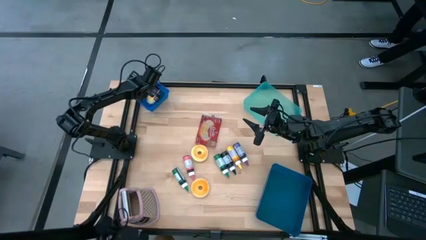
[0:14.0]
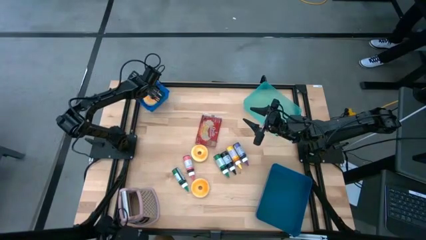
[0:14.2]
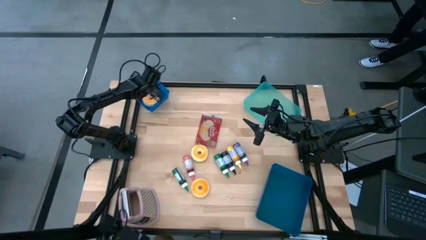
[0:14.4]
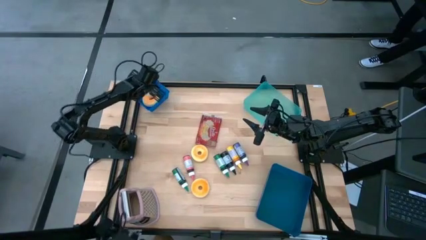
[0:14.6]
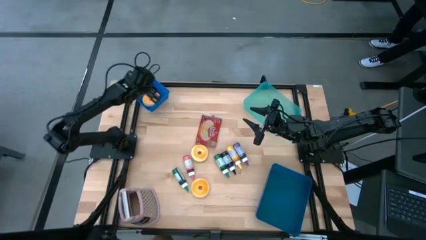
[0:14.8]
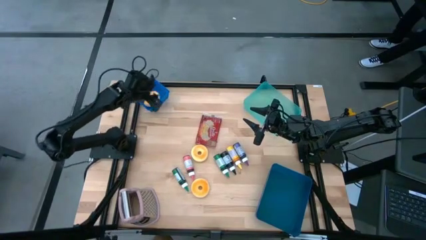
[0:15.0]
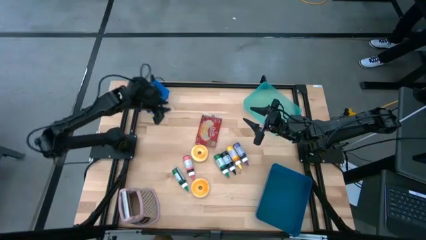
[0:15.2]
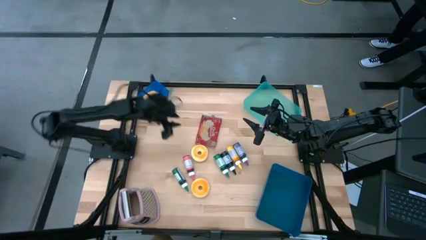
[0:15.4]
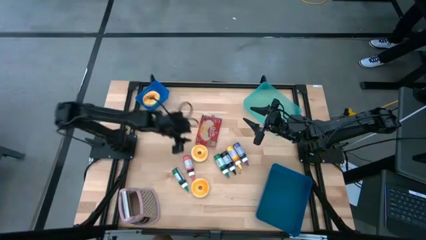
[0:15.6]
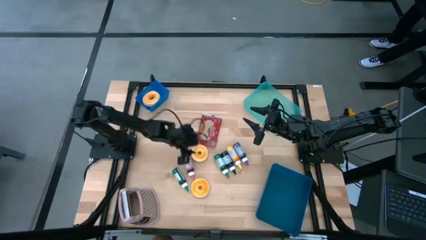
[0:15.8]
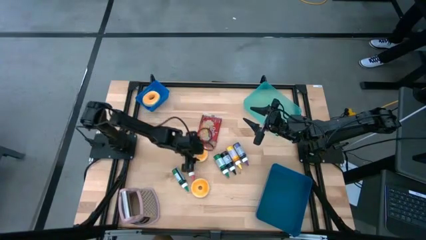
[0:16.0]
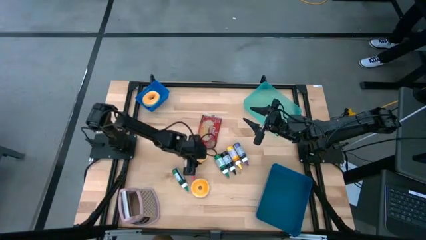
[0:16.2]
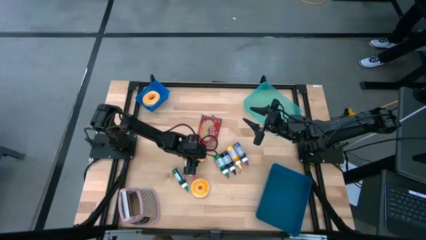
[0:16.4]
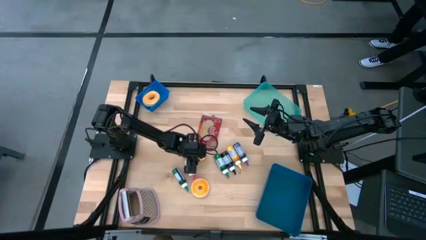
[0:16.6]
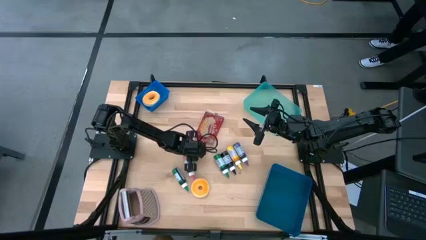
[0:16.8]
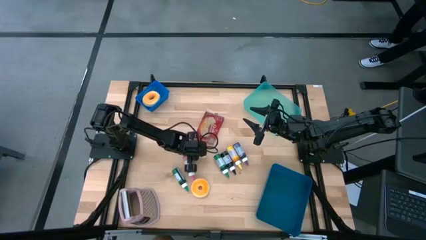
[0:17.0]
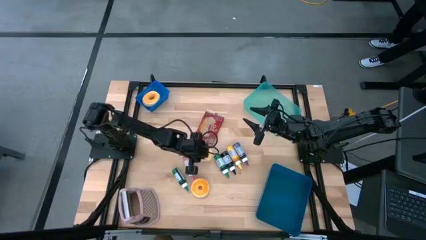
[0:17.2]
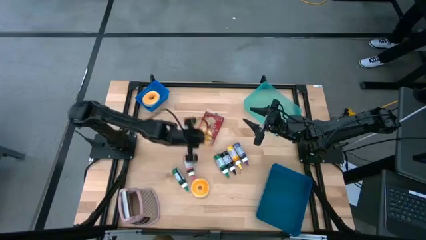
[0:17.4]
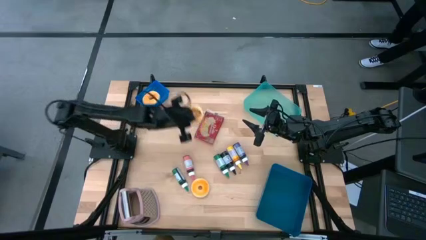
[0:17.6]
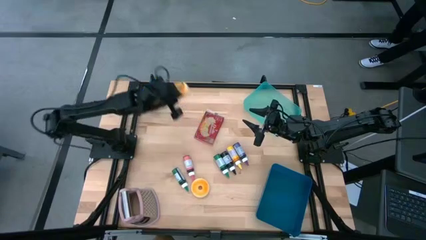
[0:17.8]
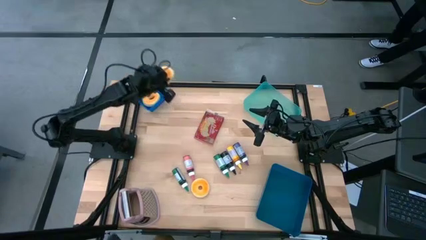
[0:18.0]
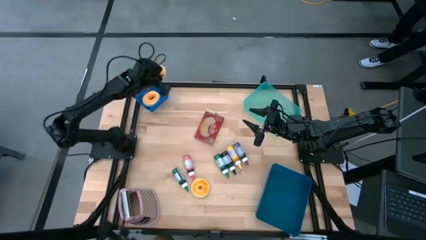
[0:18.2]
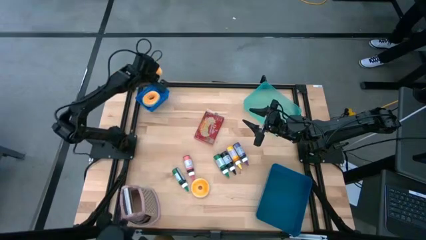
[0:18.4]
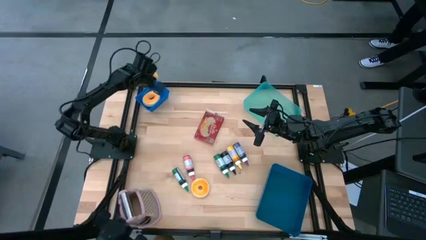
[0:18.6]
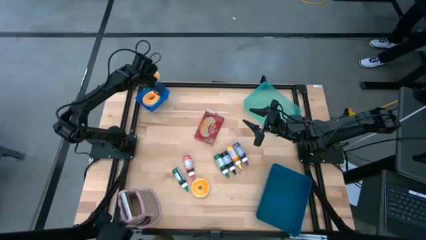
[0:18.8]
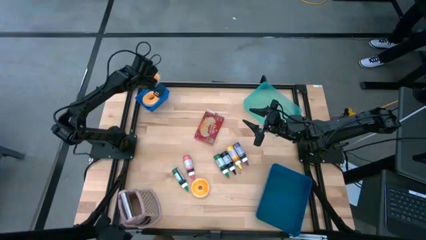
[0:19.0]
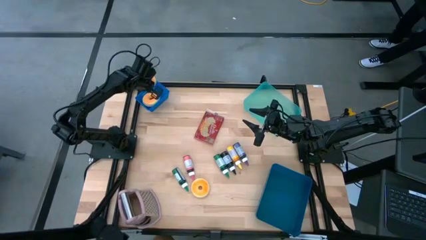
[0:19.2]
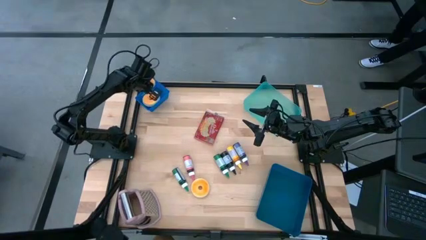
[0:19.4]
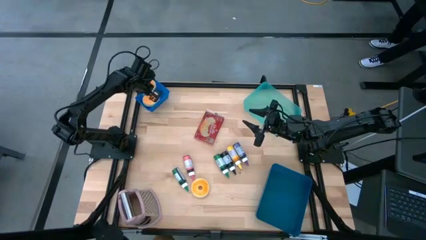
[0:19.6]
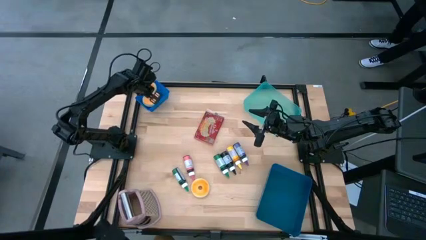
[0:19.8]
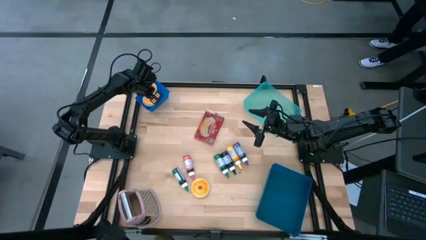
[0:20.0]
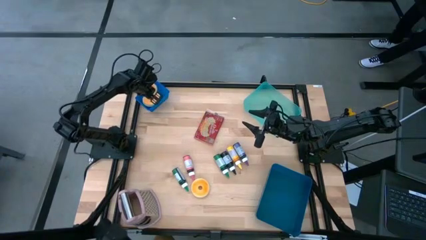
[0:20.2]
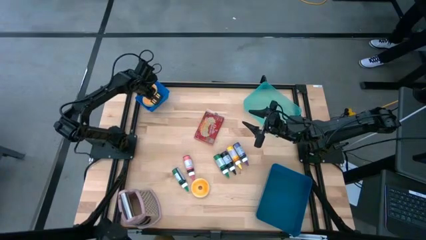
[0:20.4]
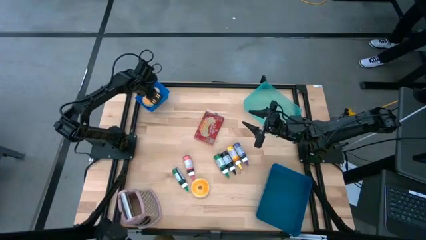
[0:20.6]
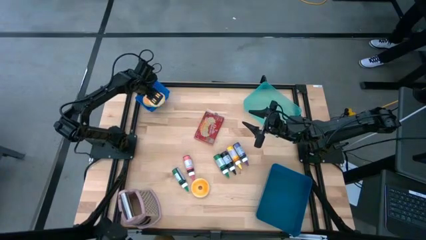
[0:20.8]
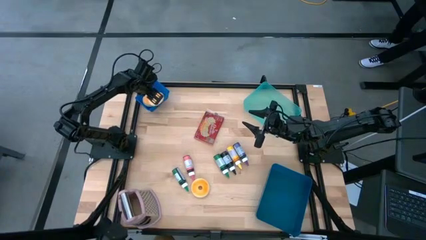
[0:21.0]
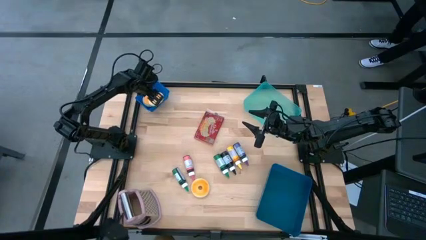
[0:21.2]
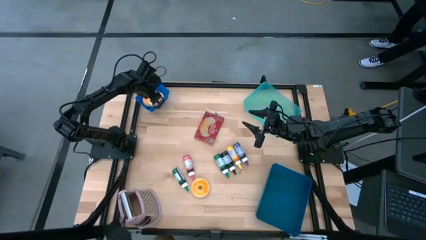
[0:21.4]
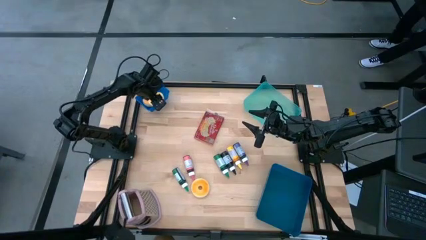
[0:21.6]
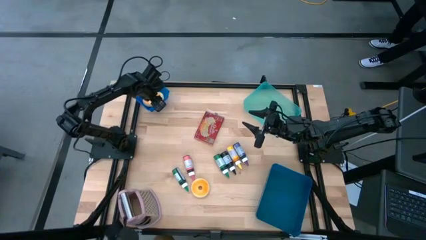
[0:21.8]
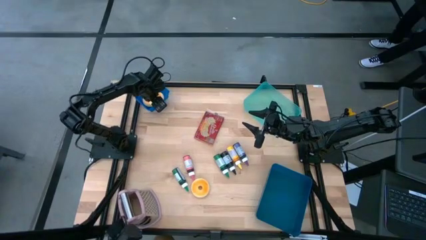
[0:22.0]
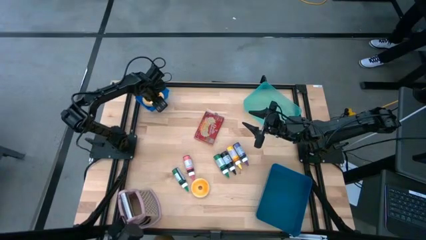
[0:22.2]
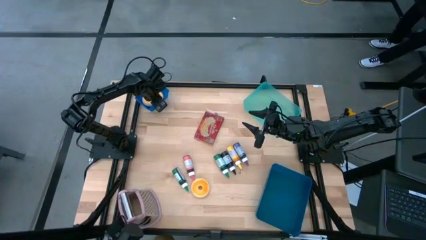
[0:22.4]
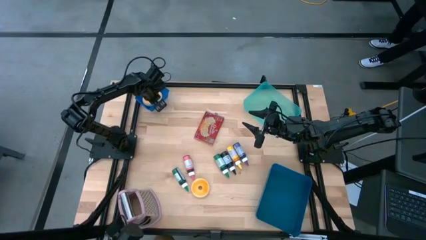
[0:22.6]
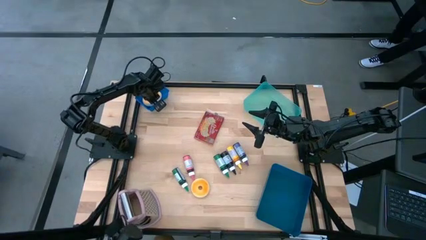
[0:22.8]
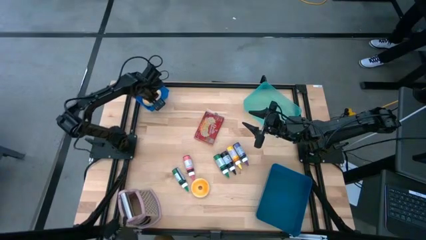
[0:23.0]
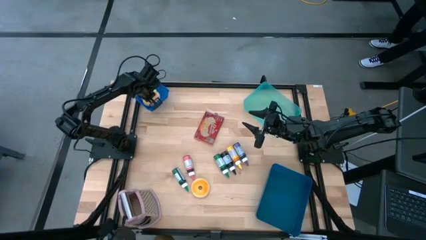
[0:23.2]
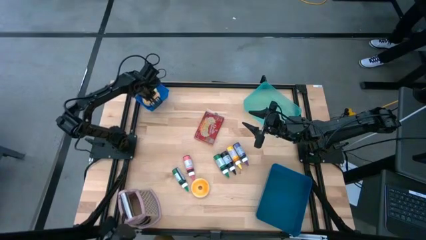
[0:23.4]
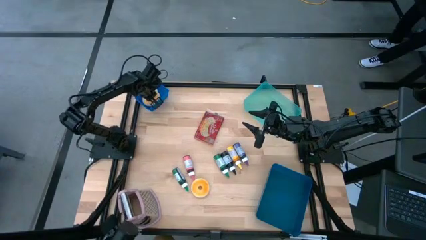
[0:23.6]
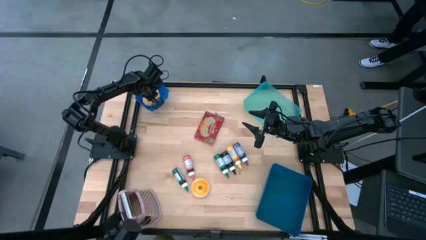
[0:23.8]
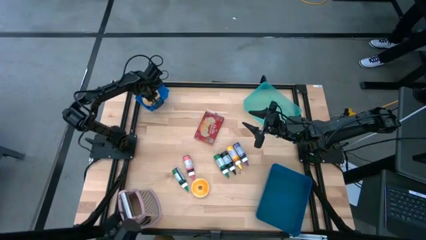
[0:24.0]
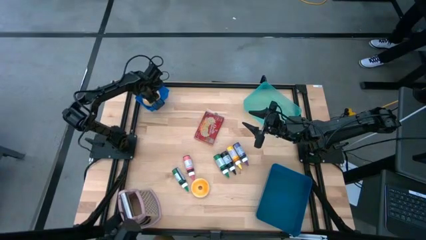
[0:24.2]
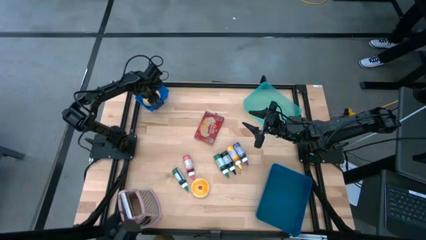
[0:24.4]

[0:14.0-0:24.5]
Put the top yellow donut into the top blue bin

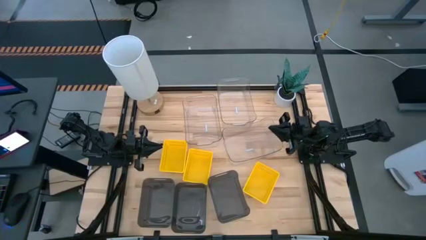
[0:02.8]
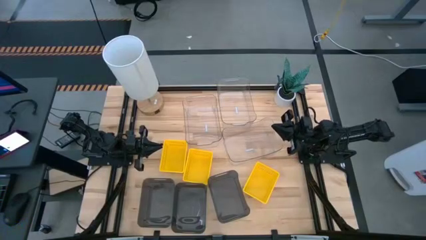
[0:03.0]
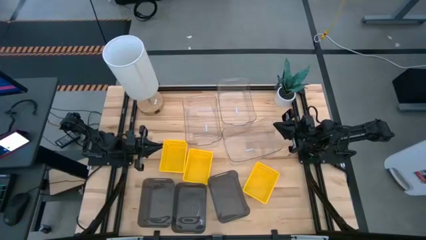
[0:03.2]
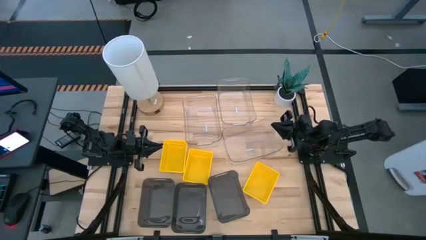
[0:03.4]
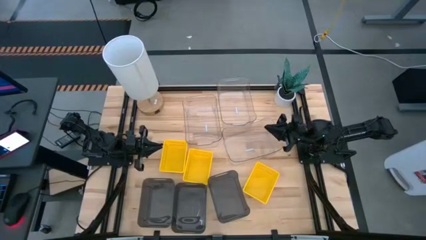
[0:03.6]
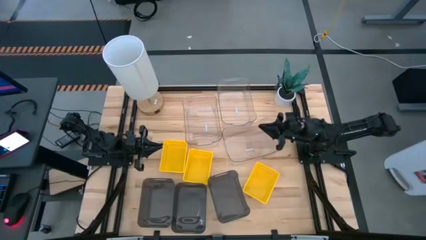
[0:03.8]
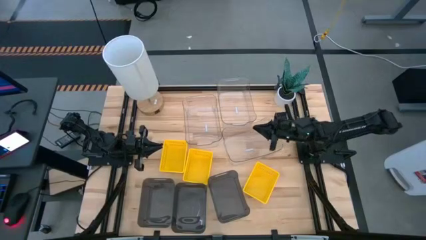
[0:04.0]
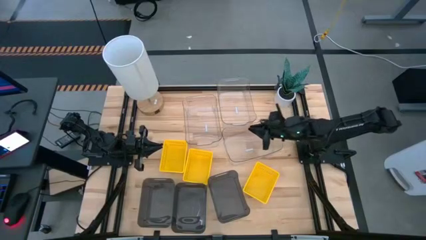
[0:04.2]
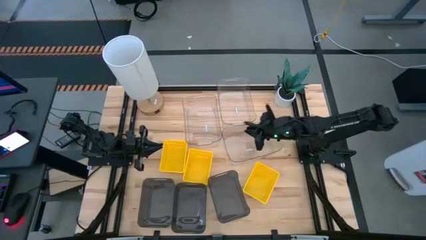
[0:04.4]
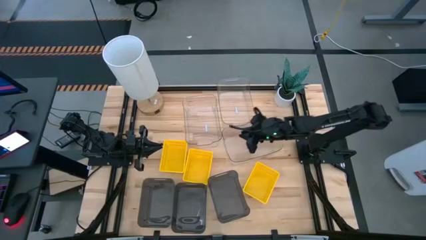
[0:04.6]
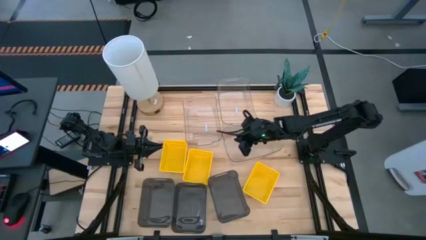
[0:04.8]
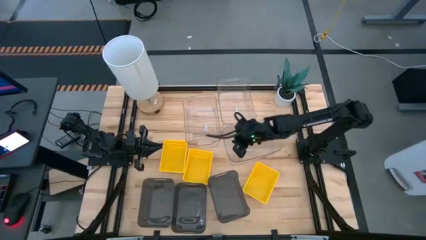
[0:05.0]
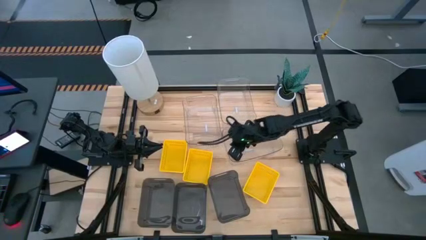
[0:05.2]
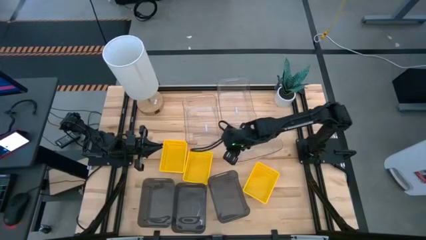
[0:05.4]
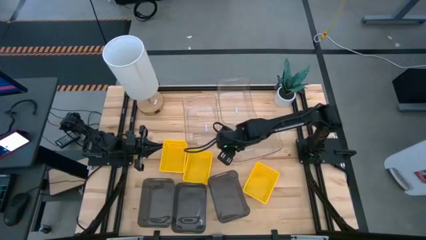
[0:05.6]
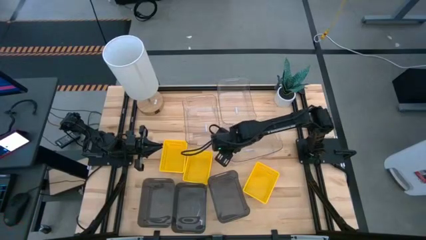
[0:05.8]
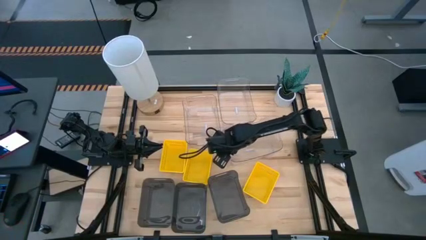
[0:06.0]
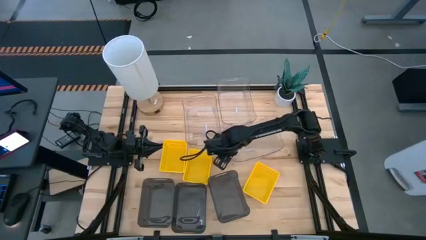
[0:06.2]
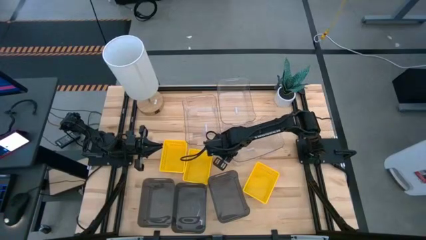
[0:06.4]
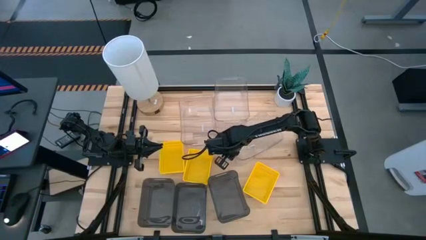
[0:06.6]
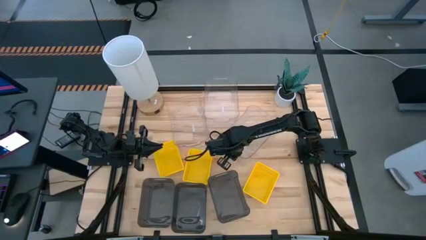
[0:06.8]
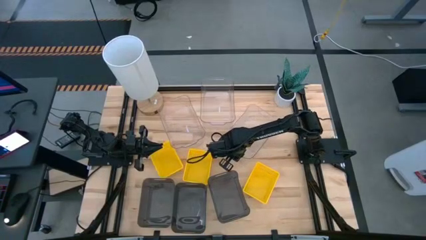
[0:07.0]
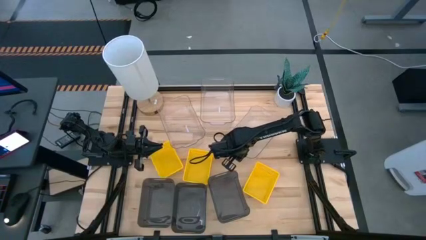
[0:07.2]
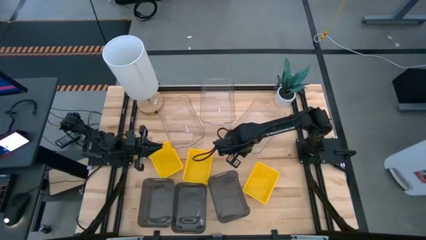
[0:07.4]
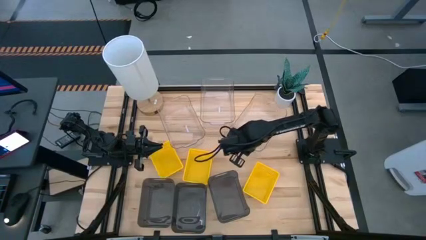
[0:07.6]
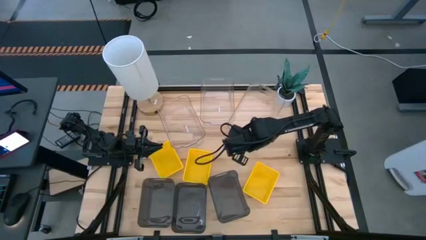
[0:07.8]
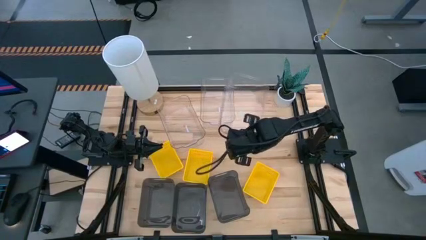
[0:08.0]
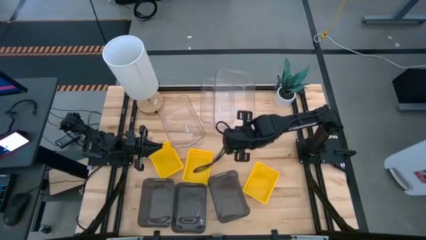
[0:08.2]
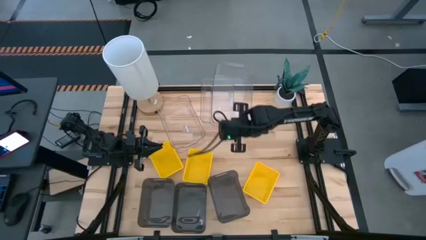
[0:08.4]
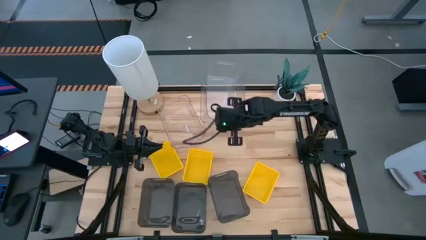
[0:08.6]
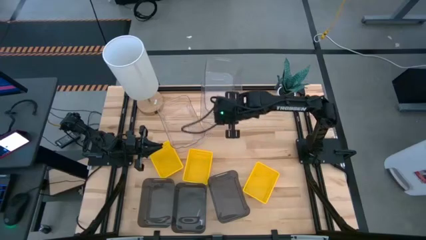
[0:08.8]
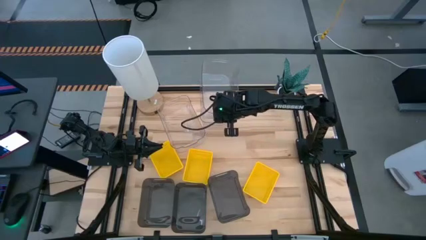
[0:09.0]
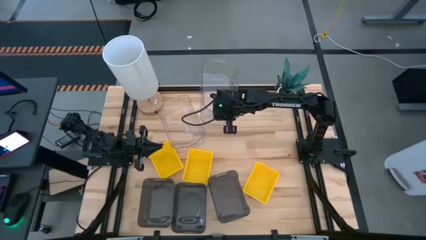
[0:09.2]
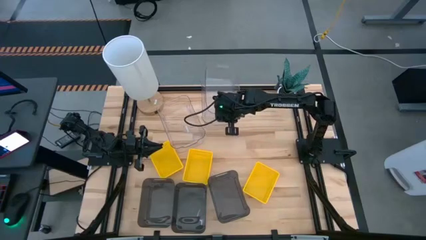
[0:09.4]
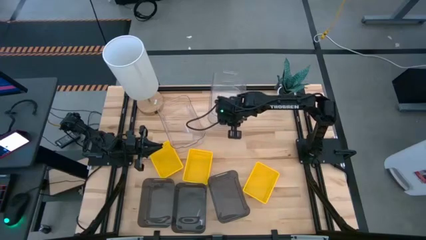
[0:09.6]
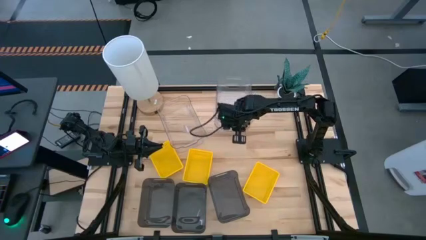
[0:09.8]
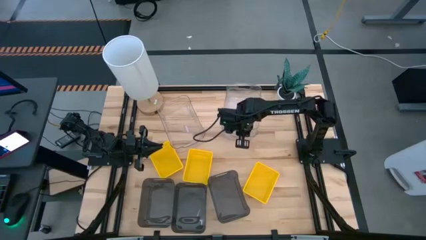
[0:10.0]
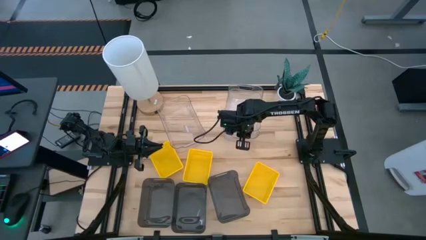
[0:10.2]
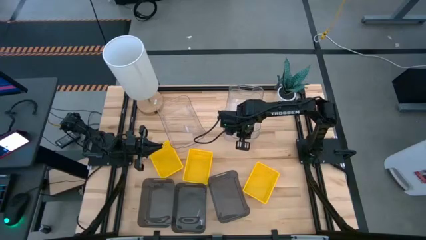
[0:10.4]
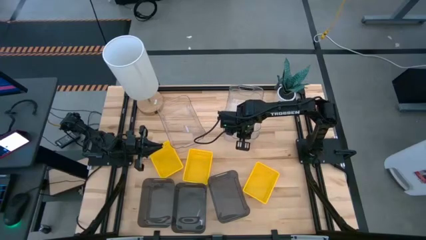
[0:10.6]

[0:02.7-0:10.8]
Stack the bottom transparent bin on top of the top transparent bin
